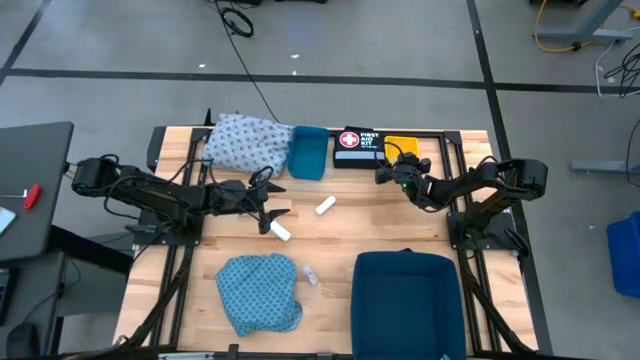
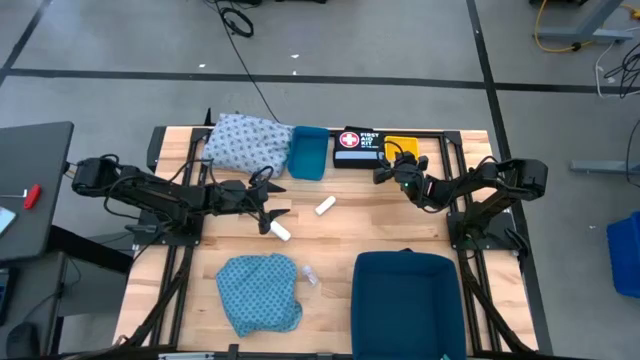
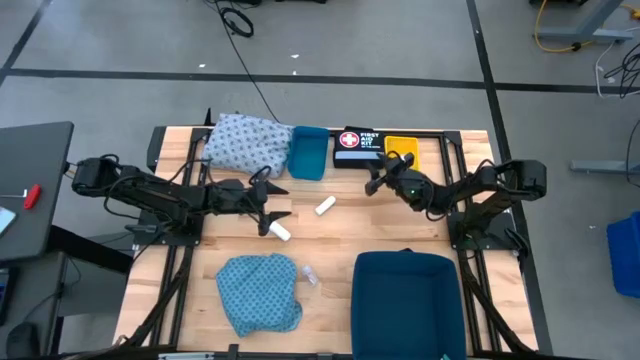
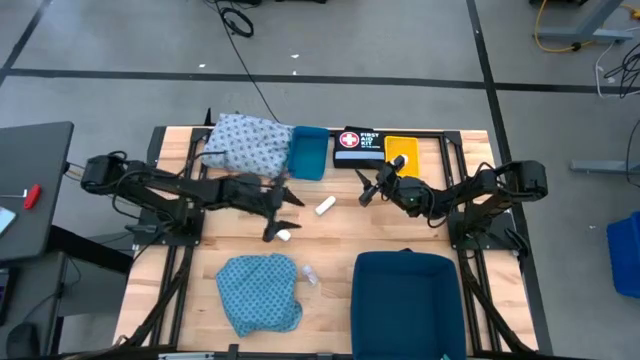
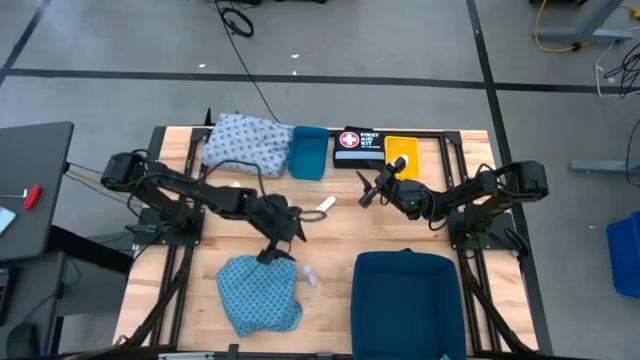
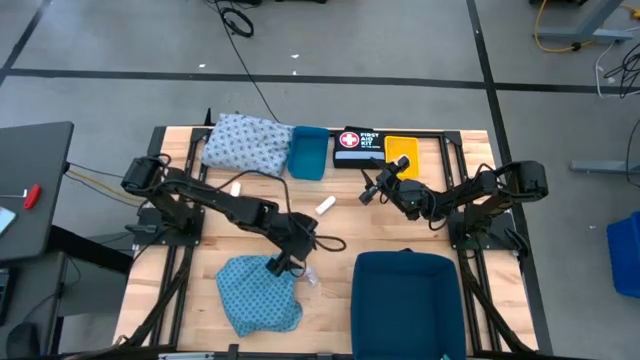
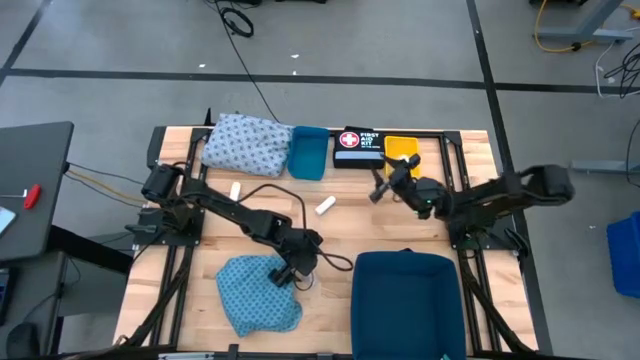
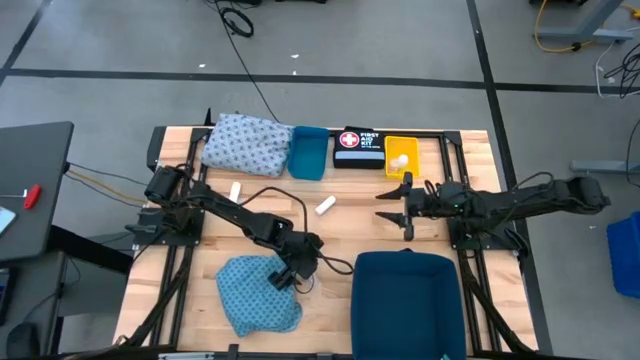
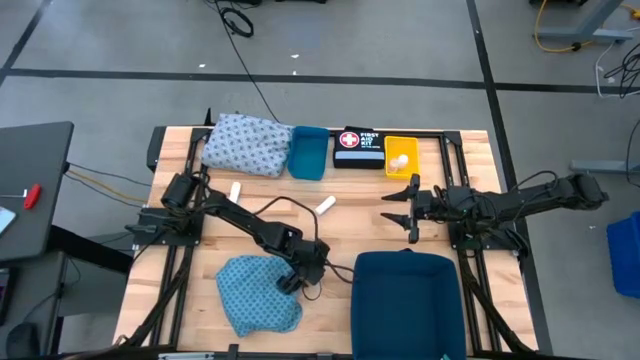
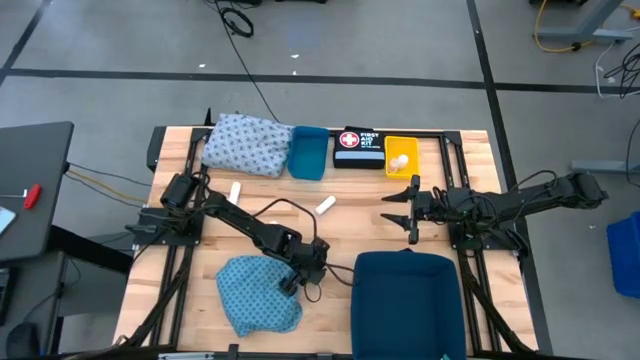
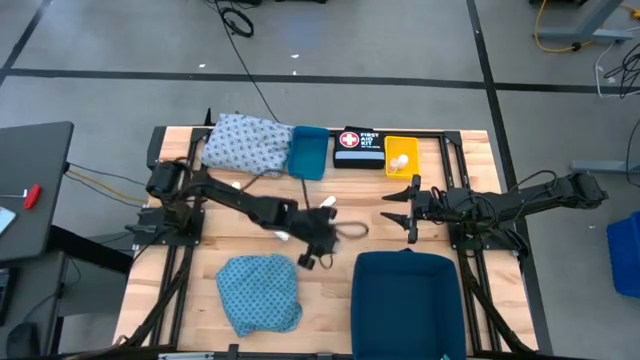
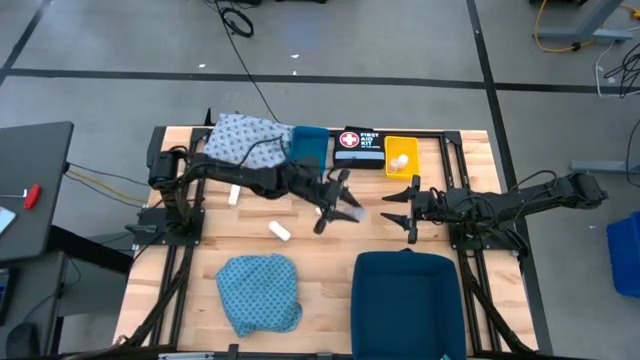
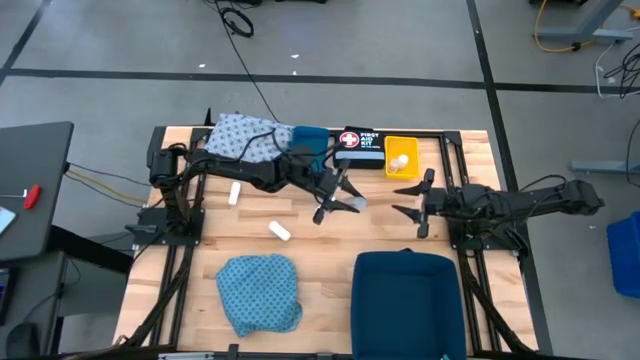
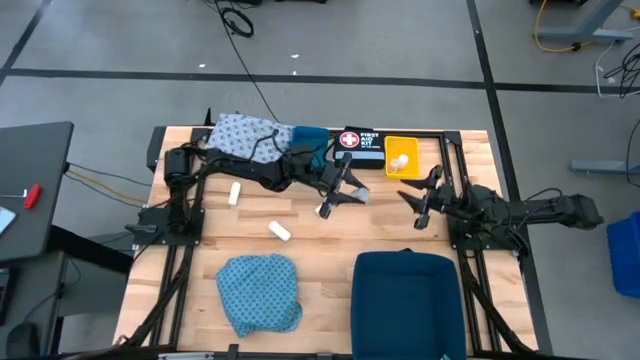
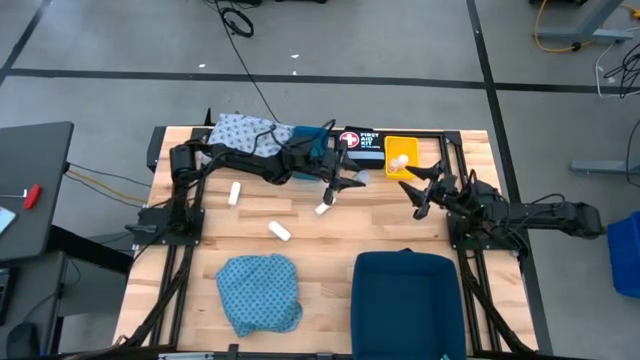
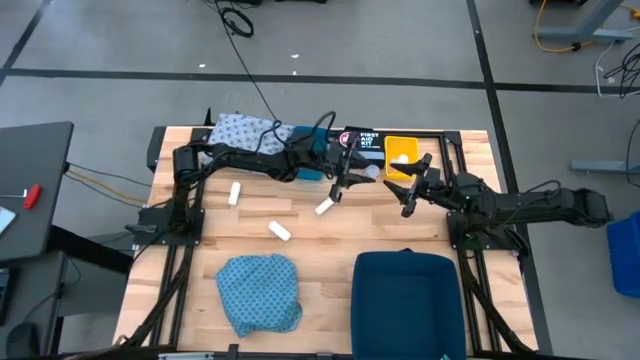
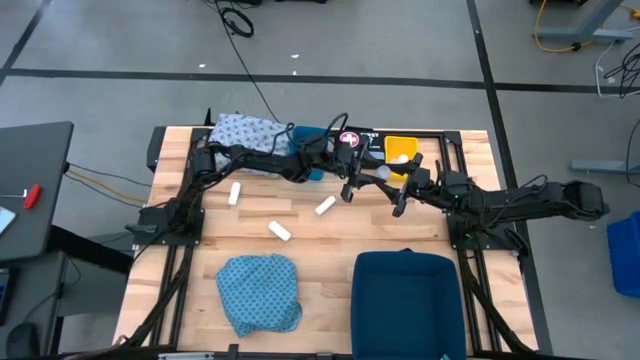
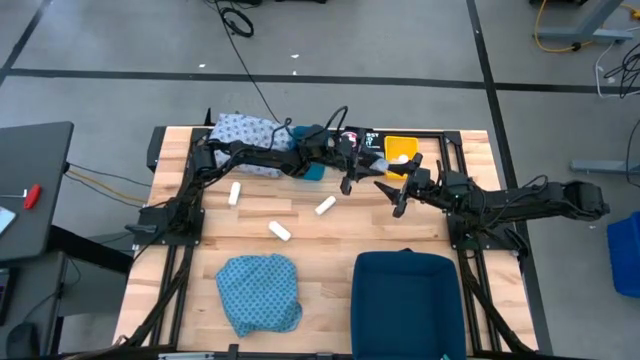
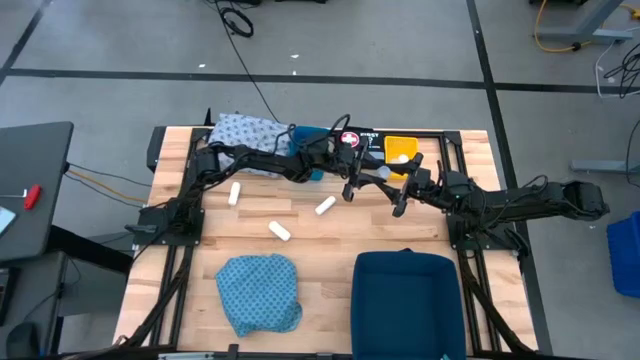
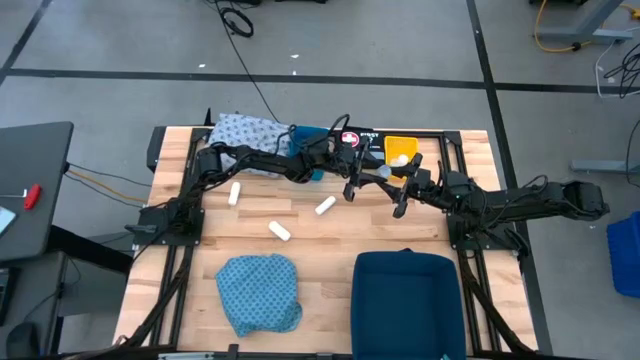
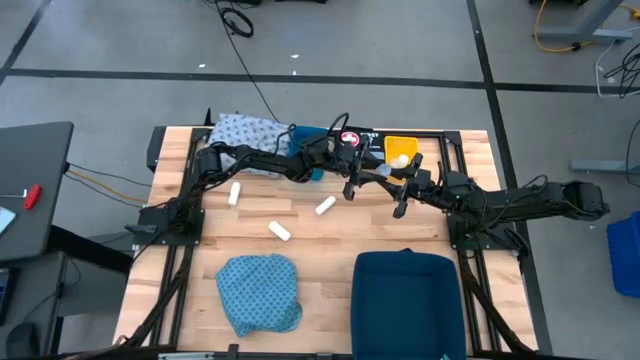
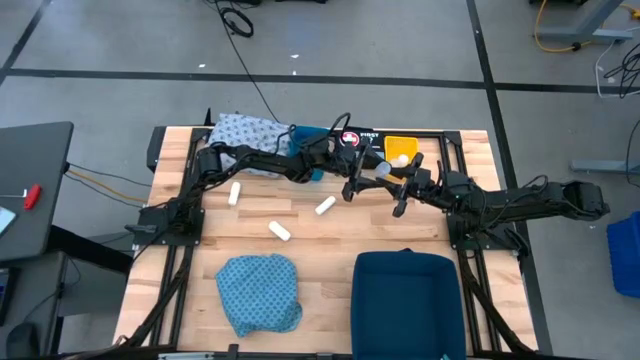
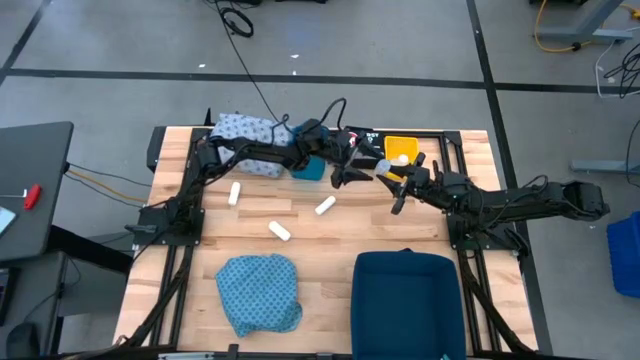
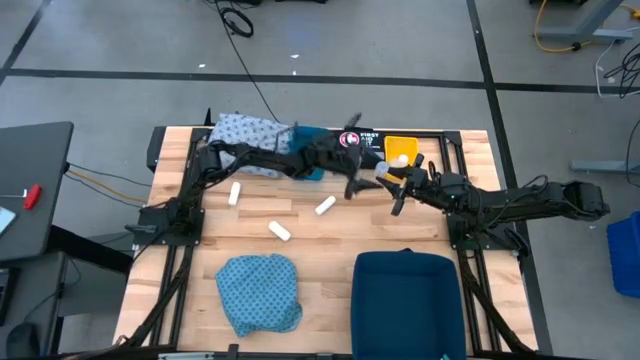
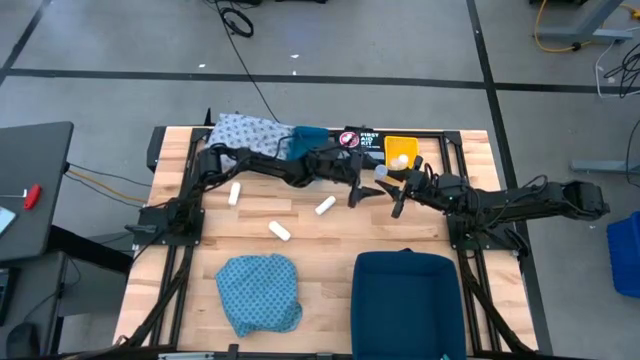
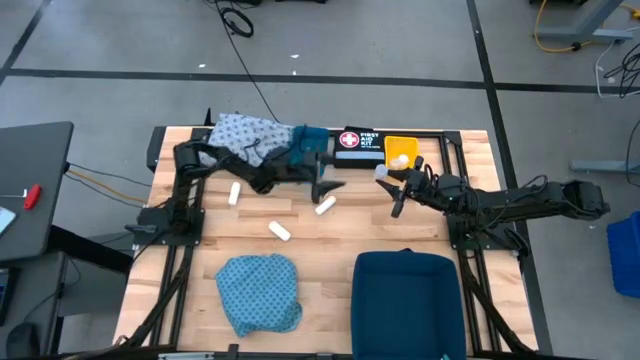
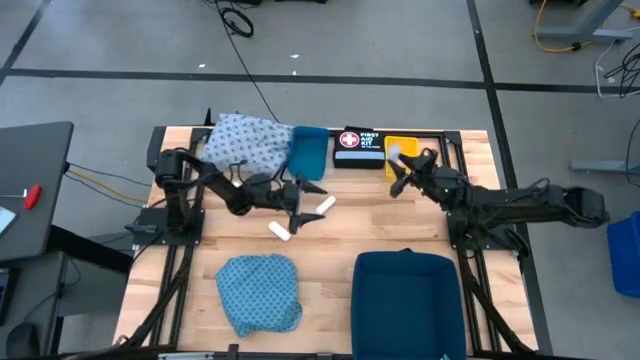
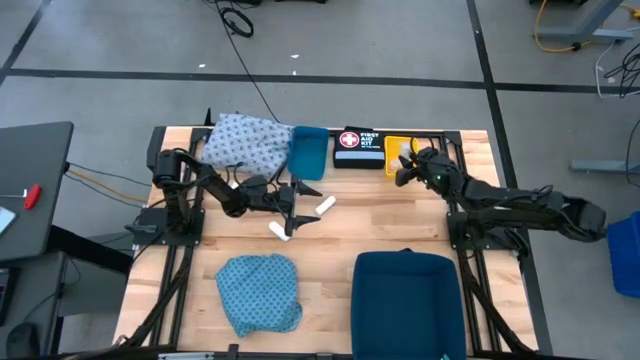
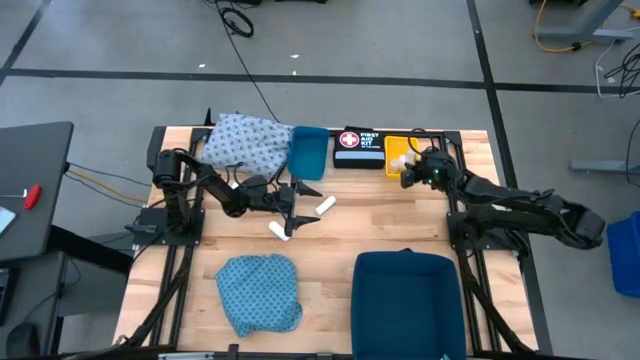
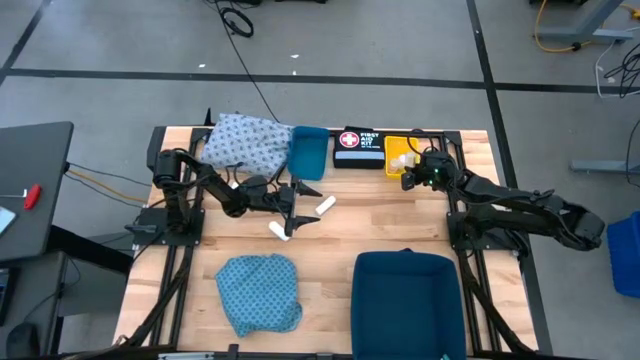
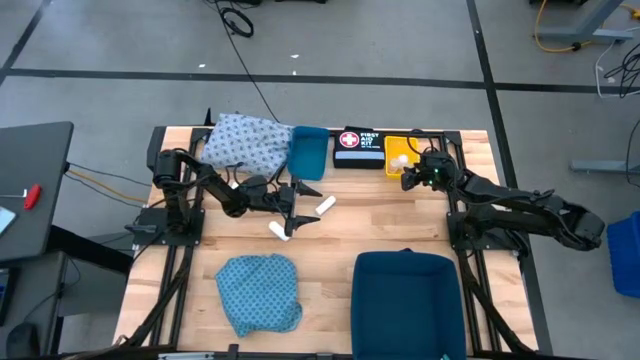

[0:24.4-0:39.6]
Task: Pick & place medical supplies in basket/bin
Put the transparent pill bottle into the yellow basket

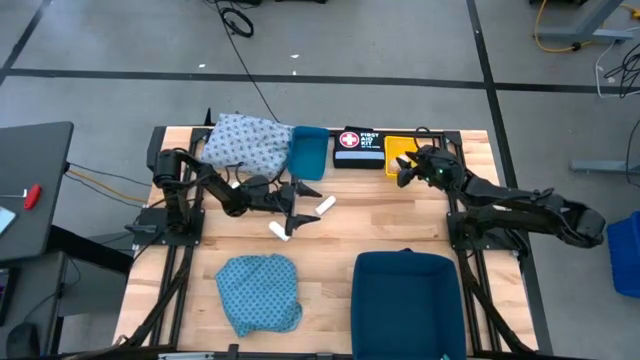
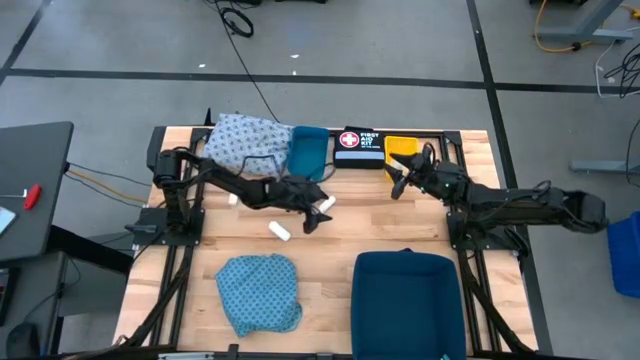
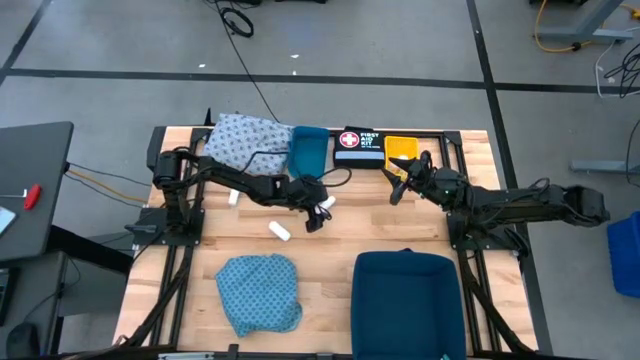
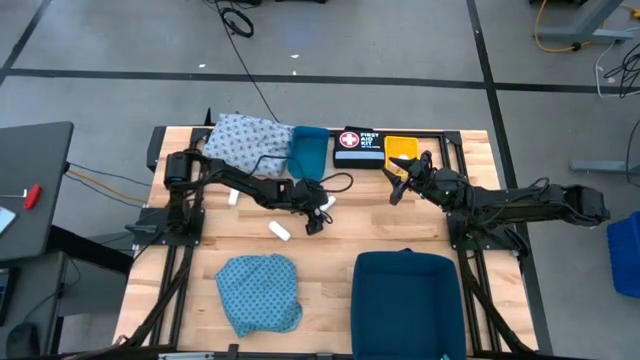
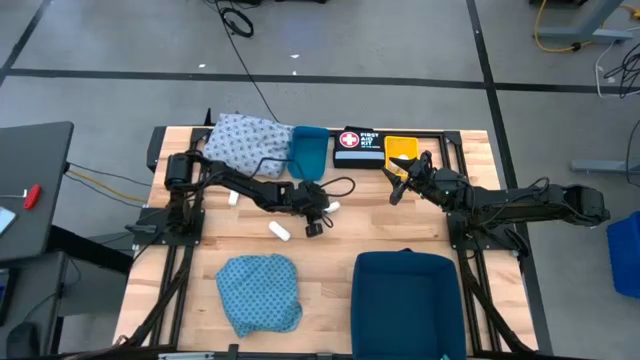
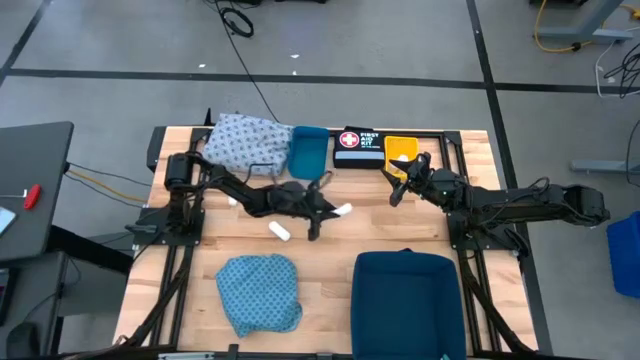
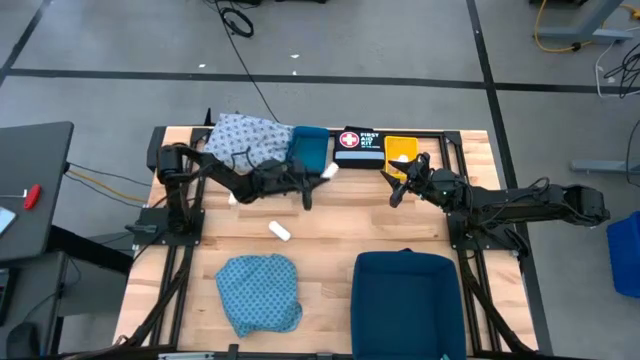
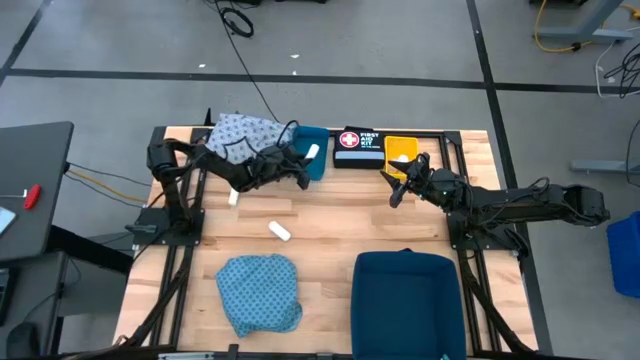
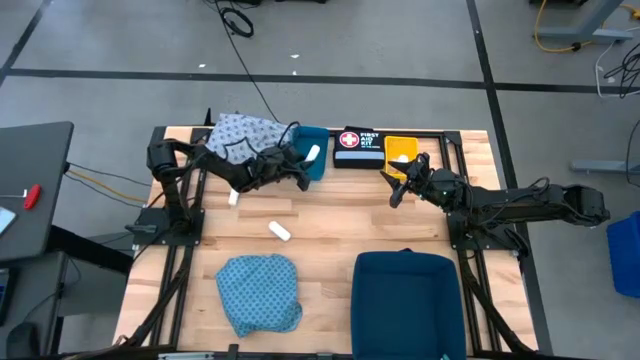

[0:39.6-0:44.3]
Put the top right white rolled gauze into the blue bin

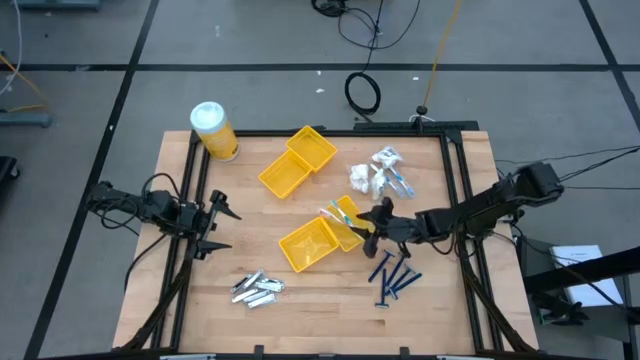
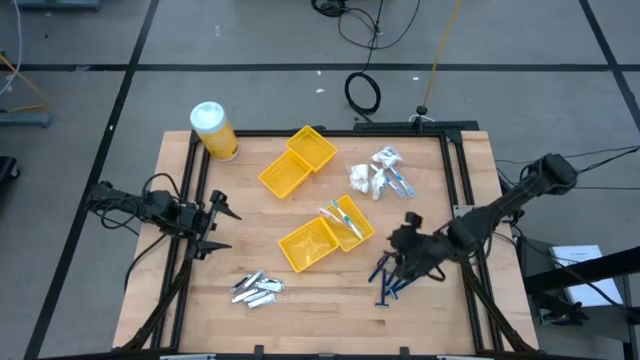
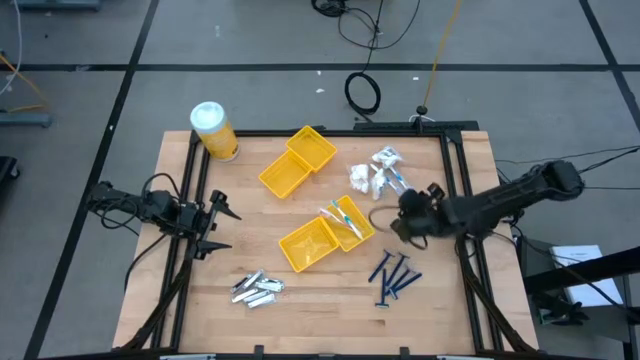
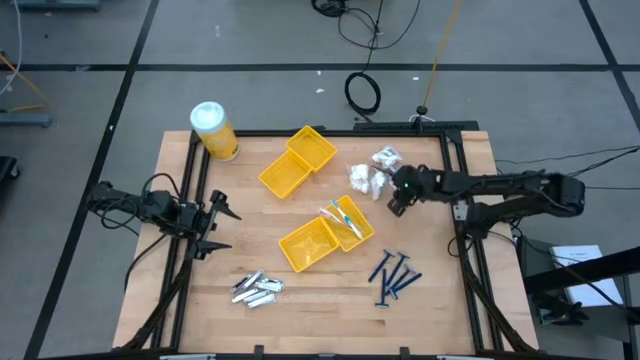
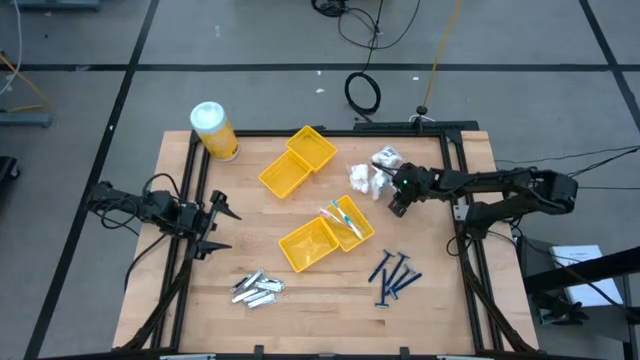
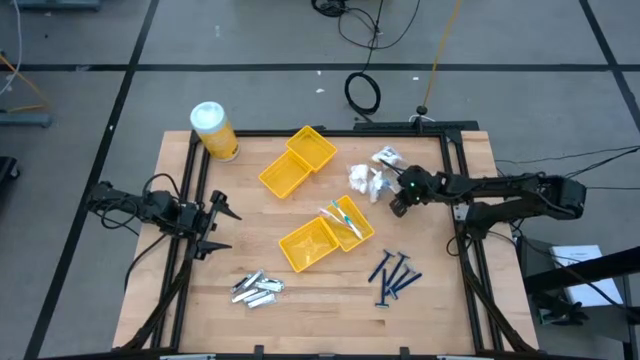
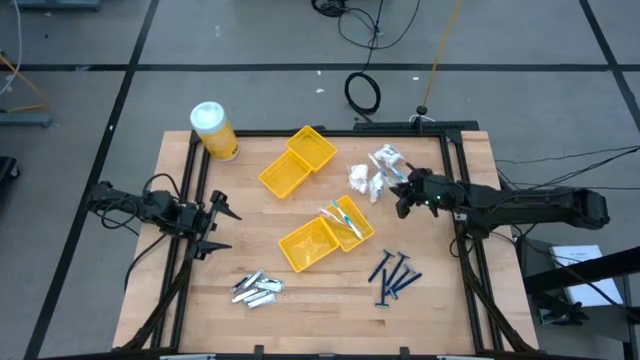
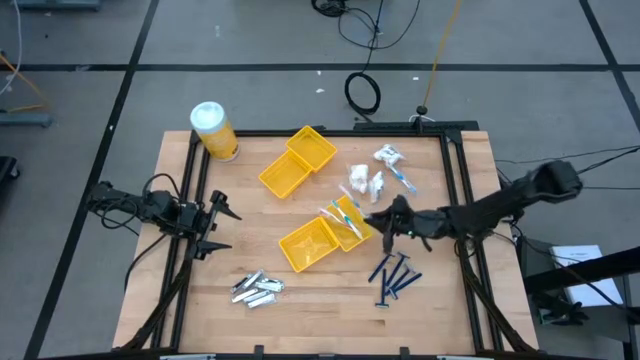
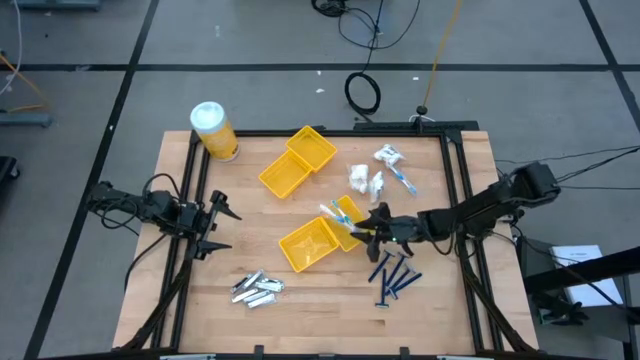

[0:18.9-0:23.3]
Task: Pick & Place Travel size toiletries
Put the blue toothbrush into the bottom right yellow basket
